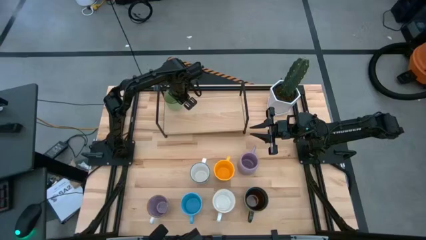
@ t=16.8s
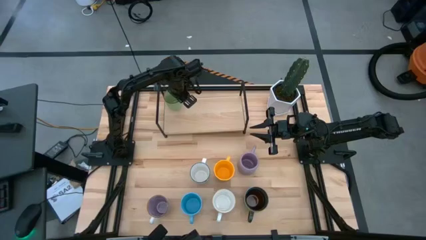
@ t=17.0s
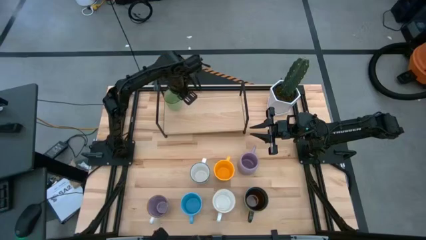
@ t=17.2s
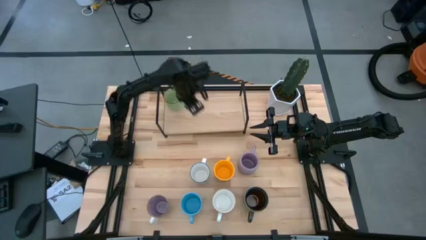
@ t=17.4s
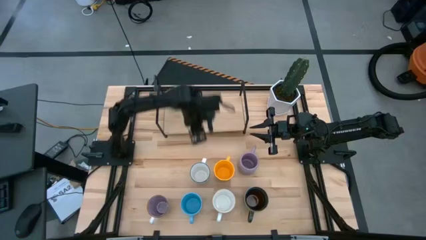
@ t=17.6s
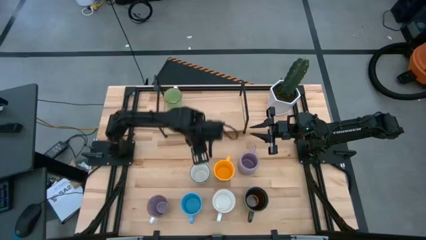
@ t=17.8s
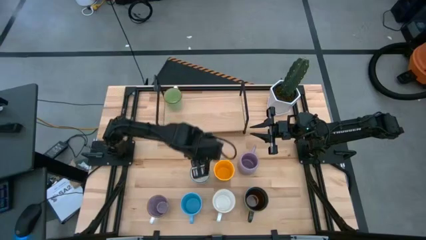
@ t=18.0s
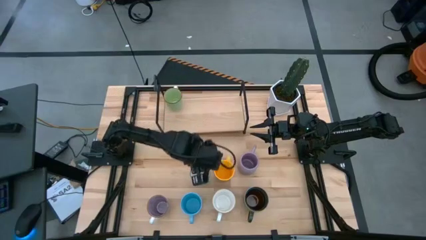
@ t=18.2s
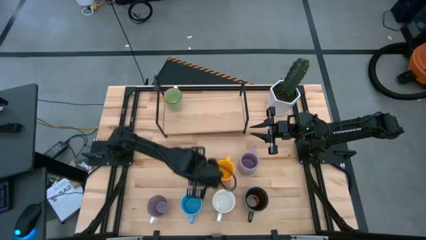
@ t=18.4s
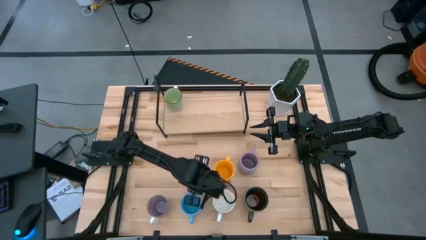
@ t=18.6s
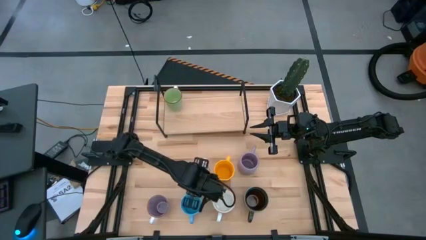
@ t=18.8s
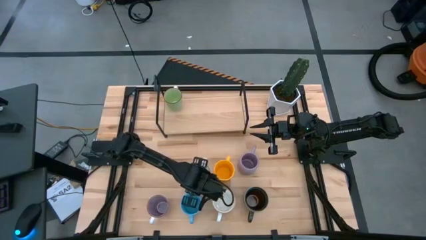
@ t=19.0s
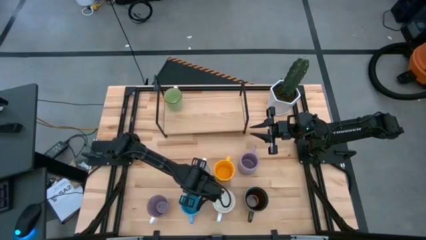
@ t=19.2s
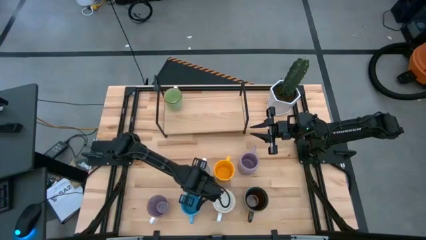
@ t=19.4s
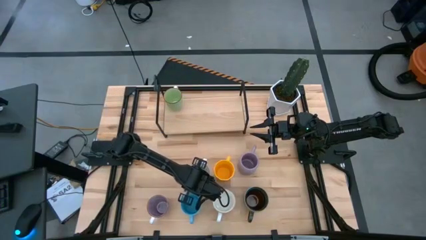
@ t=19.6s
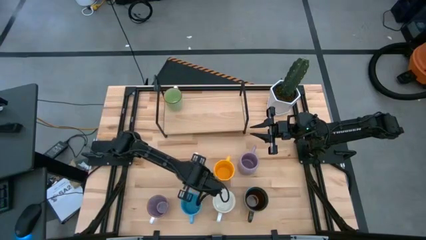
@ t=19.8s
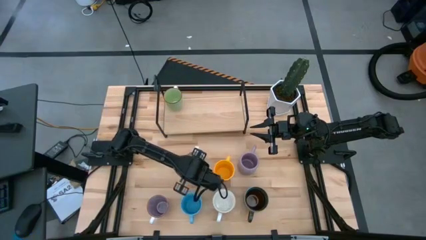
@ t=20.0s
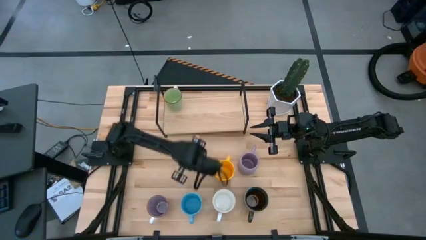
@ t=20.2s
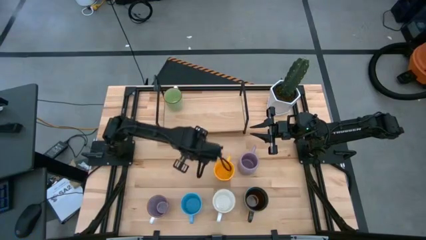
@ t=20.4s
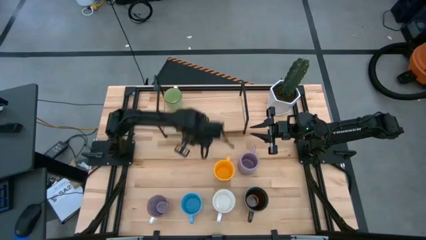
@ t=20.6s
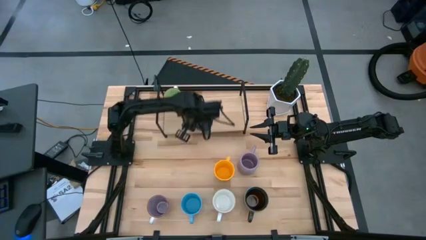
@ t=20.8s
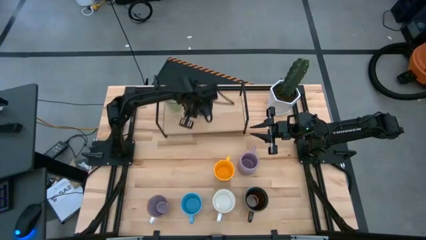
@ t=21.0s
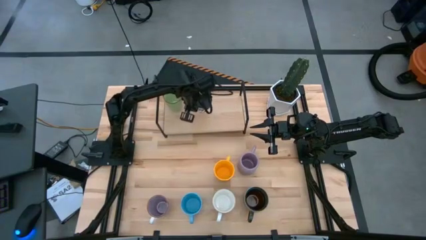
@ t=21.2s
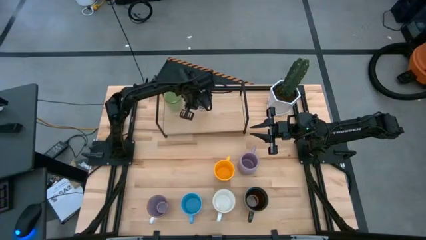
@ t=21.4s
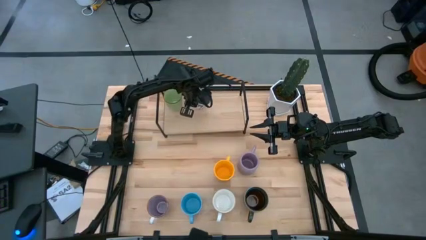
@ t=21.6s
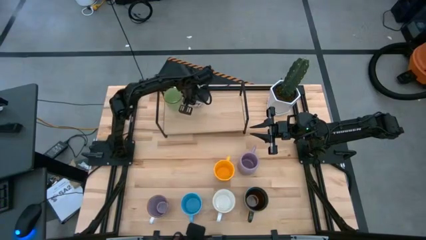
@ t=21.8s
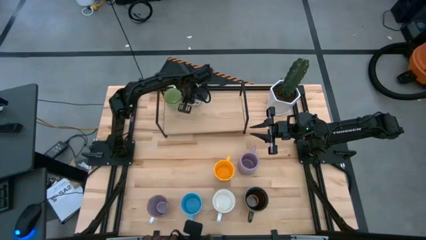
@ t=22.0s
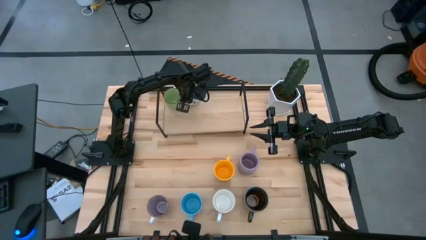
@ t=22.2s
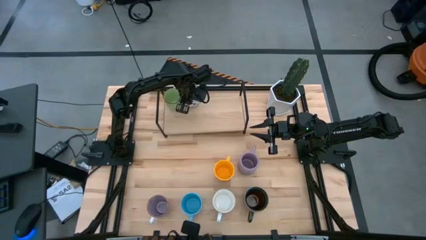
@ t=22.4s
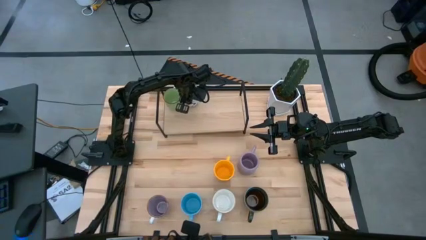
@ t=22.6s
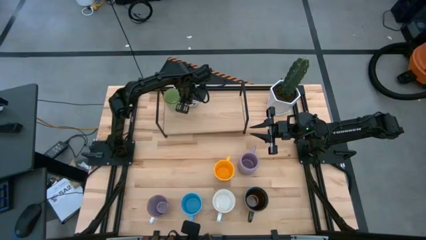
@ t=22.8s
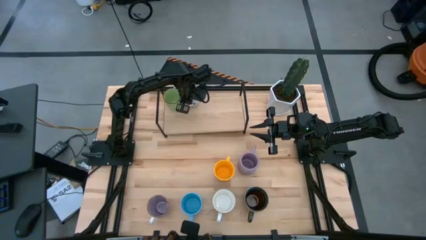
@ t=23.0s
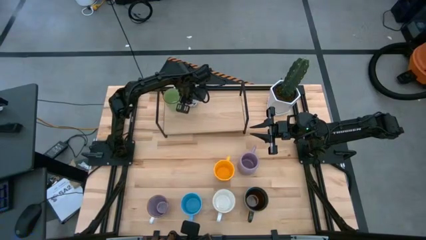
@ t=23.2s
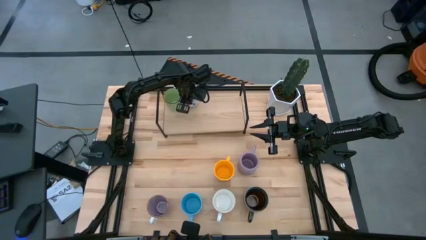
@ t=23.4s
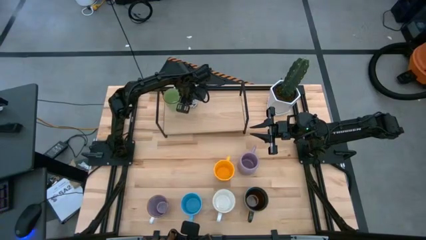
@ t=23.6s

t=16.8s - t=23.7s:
Task: Place coffee mugs
Put the blue patterned mug on the shelf

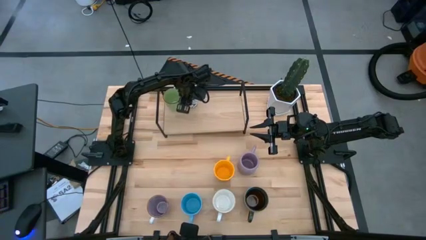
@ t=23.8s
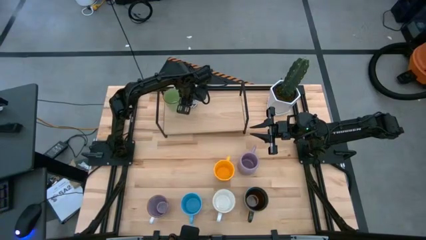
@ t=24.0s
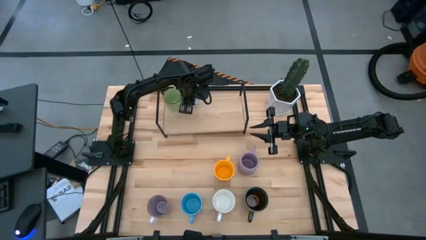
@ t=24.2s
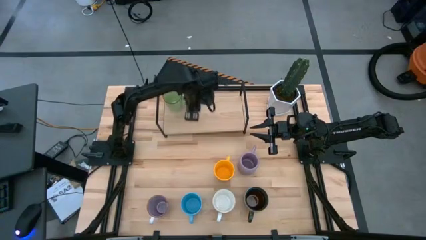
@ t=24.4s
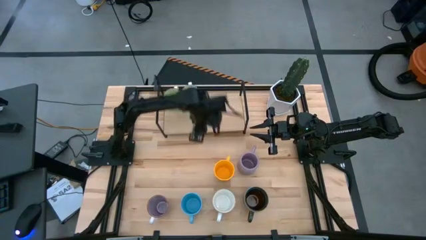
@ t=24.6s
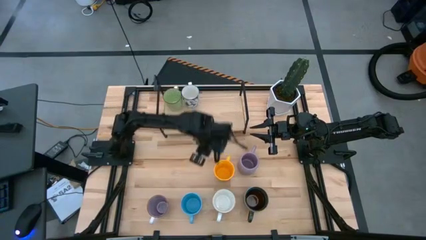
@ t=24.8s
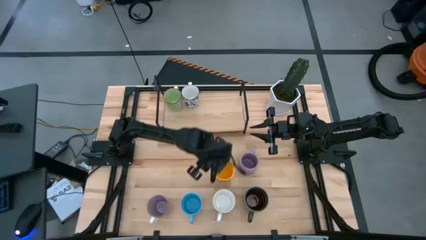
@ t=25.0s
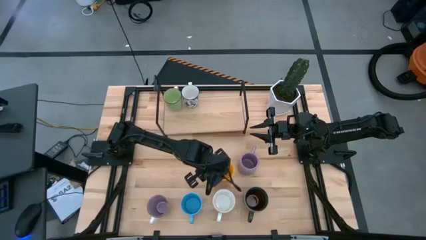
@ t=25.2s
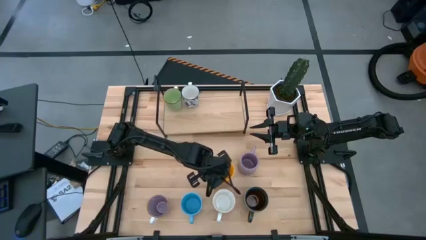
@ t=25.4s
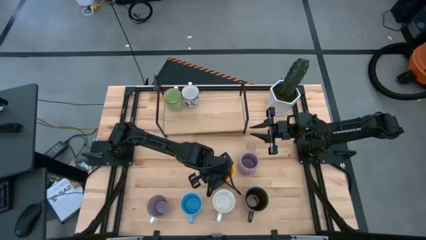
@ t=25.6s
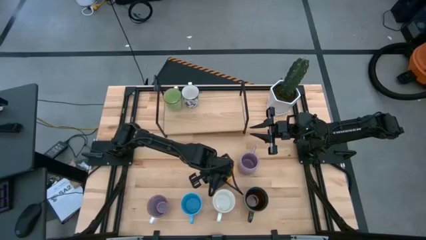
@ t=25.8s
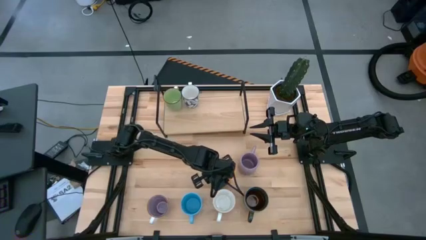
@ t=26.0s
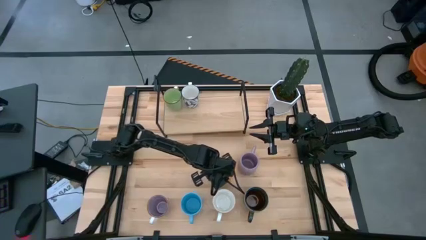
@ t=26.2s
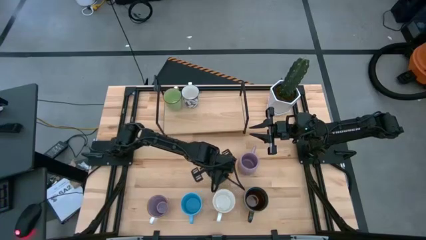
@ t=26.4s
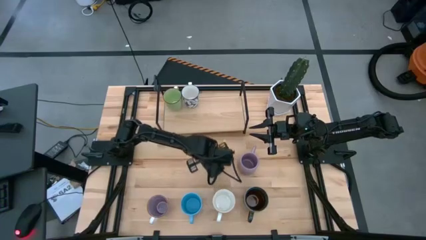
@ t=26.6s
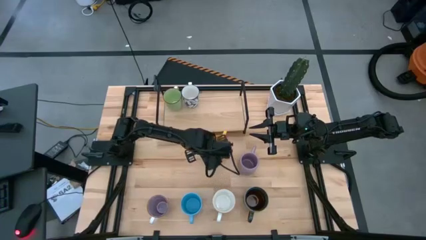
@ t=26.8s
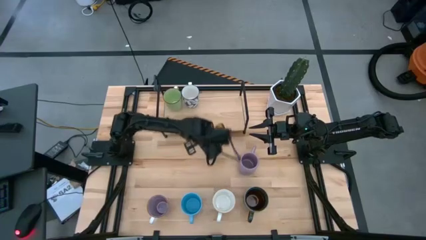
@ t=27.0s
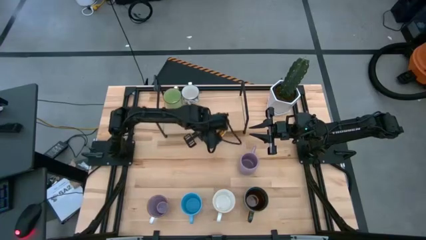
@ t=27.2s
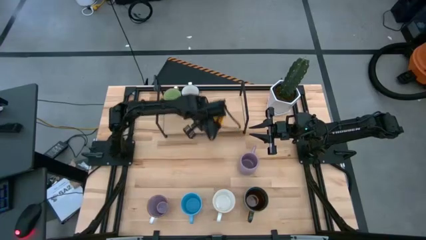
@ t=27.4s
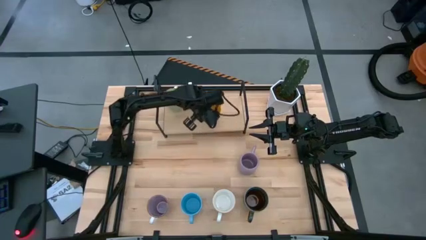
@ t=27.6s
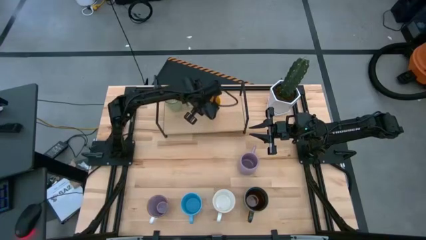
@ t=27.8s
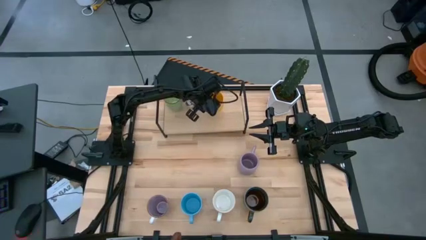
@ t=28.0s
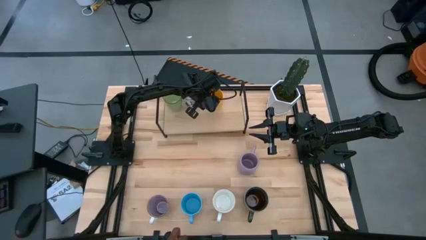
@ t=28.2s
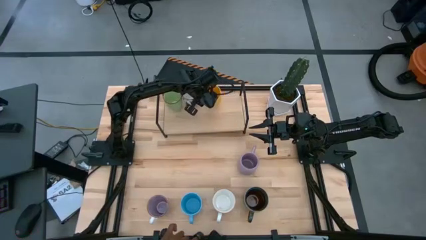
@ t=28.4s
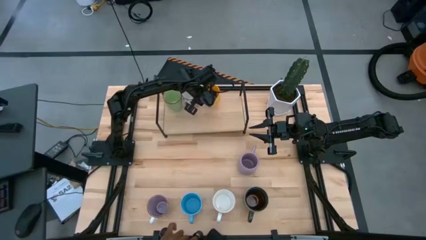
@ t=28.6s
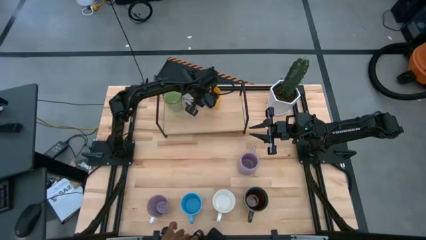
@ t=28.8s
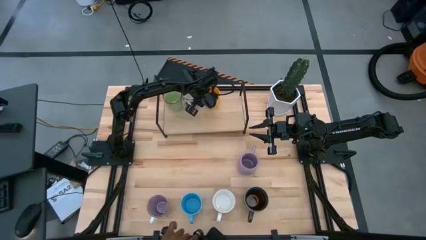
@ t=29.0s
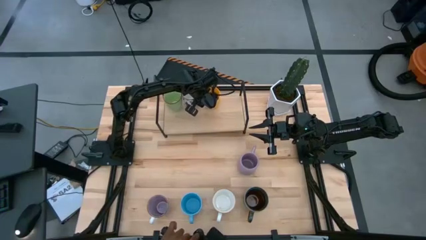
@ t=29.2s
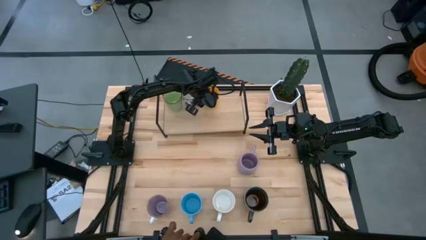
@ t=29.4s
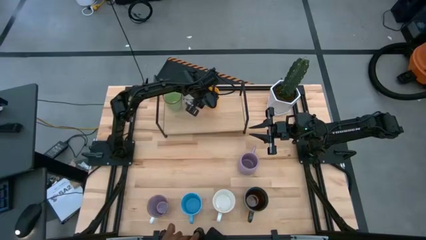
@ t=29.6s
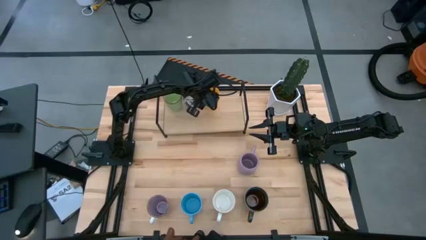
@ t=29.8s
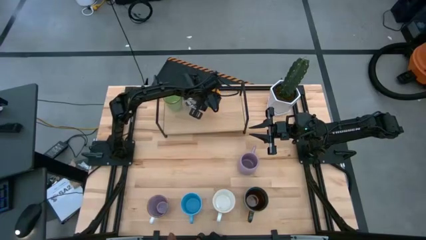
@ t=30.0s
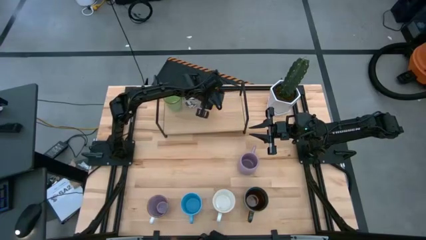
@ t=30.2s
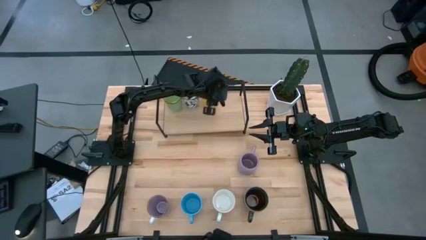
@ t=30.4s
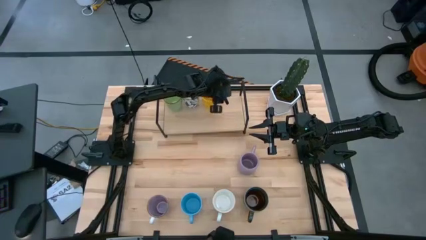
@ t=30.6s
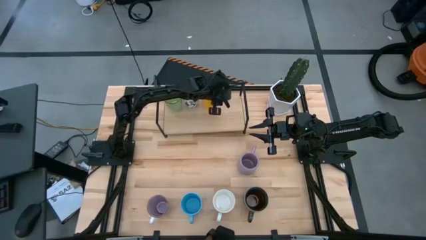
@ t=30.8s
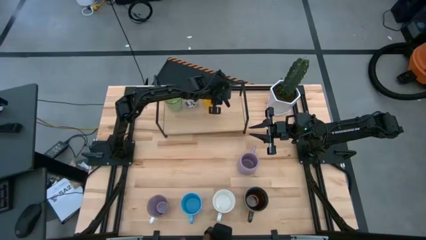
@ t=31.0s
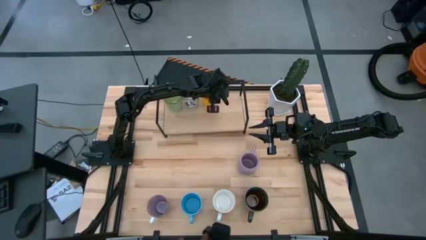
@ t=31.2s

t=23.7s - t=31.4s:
Put the yellow mug on the shelf
